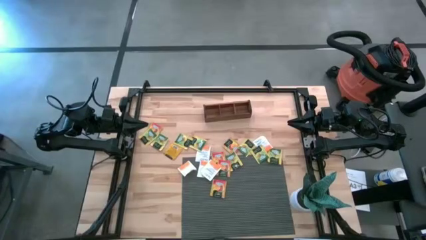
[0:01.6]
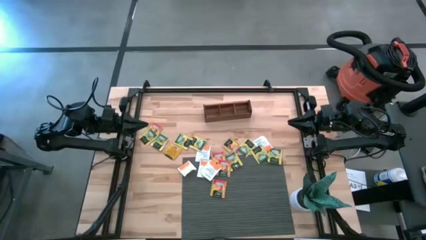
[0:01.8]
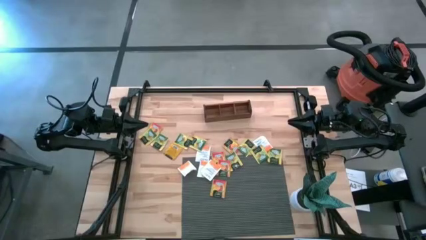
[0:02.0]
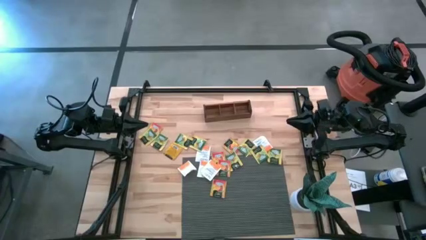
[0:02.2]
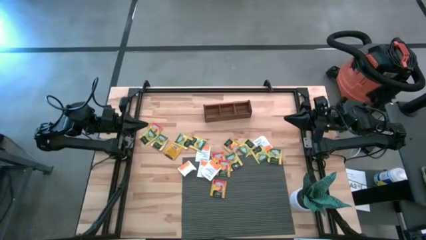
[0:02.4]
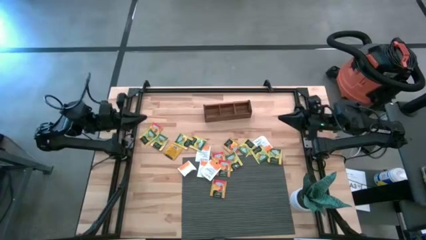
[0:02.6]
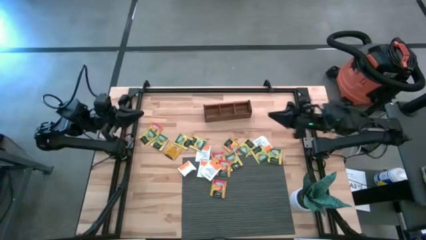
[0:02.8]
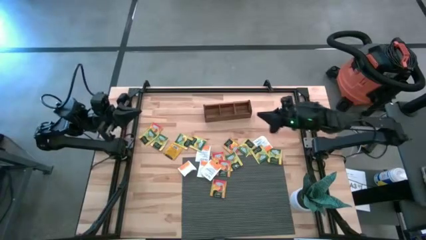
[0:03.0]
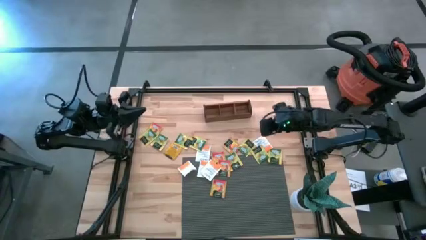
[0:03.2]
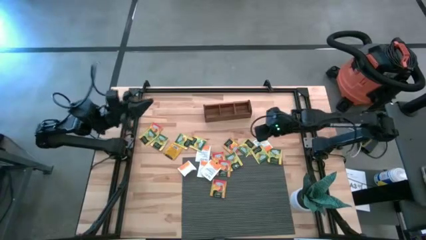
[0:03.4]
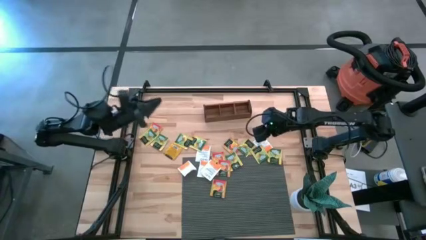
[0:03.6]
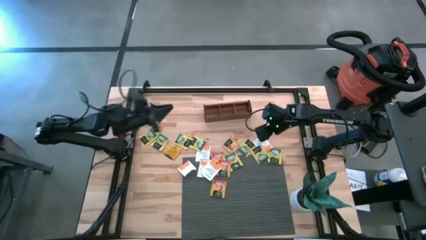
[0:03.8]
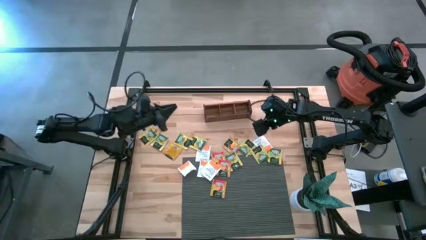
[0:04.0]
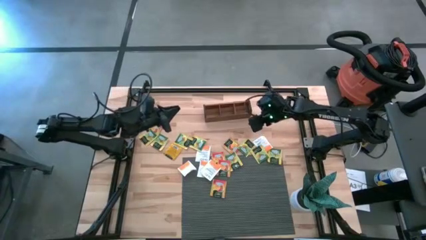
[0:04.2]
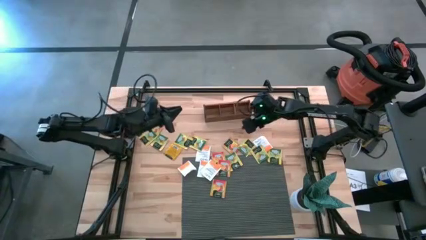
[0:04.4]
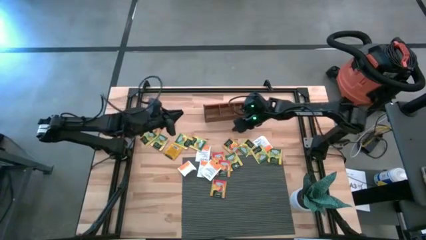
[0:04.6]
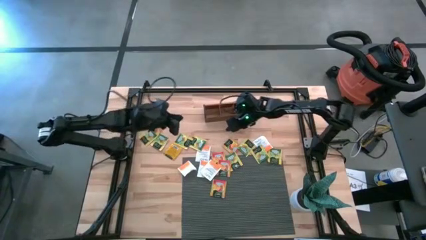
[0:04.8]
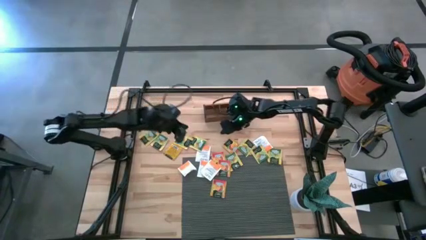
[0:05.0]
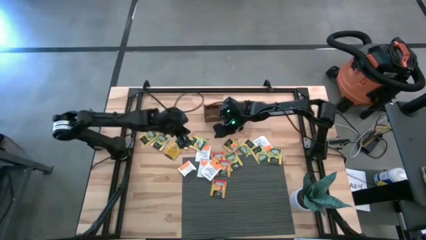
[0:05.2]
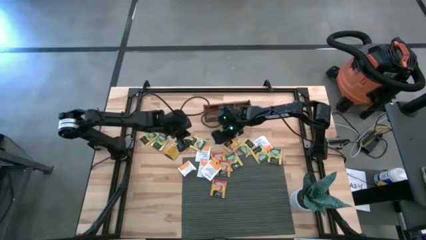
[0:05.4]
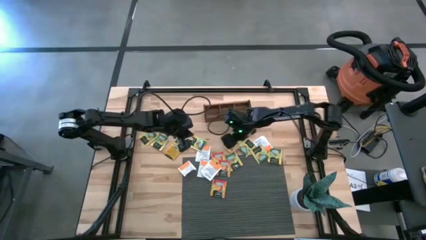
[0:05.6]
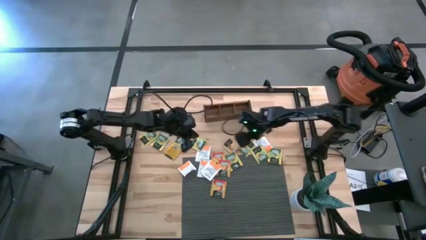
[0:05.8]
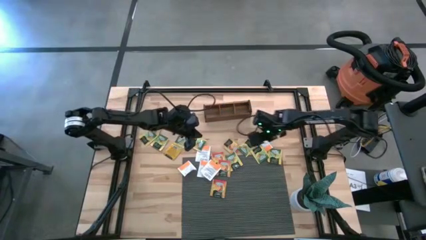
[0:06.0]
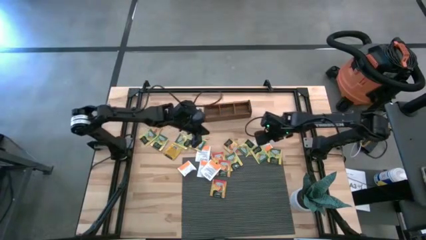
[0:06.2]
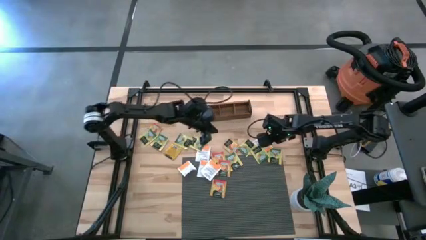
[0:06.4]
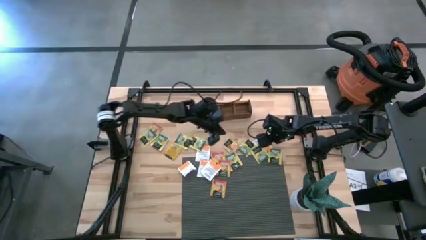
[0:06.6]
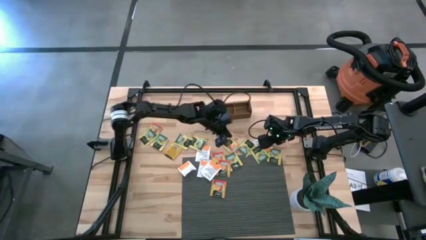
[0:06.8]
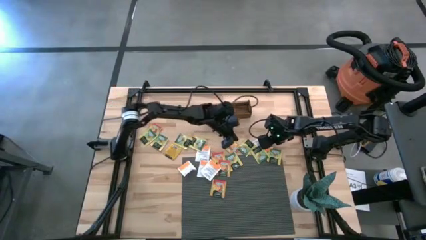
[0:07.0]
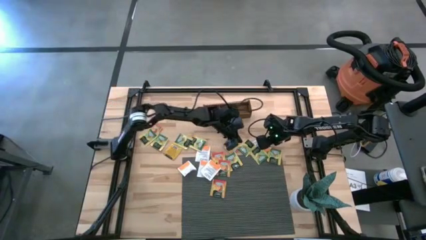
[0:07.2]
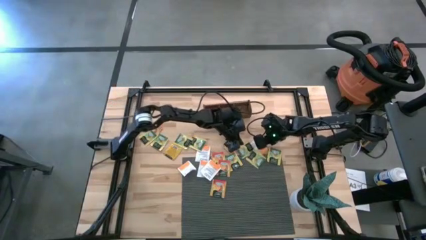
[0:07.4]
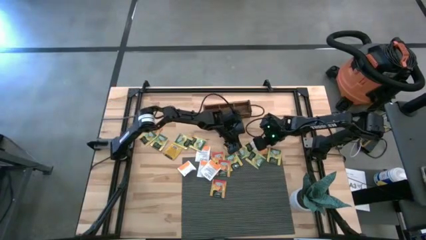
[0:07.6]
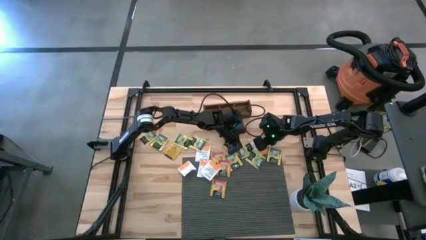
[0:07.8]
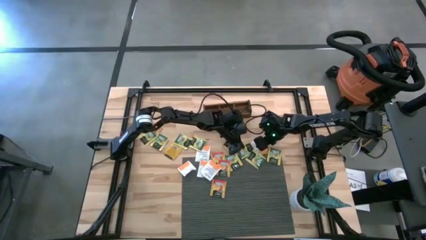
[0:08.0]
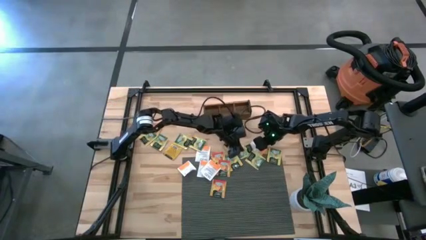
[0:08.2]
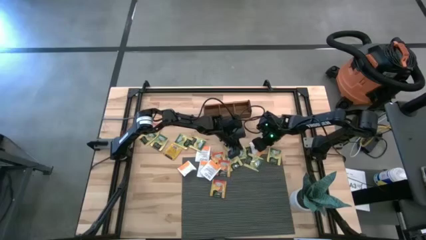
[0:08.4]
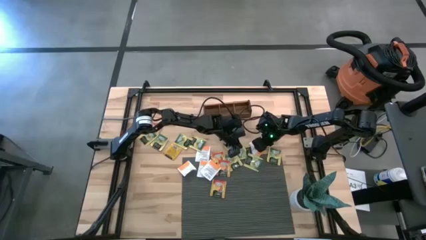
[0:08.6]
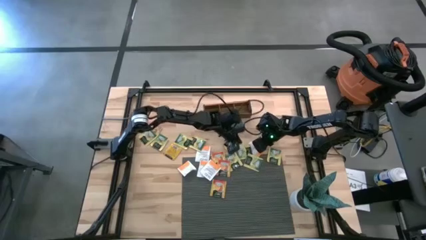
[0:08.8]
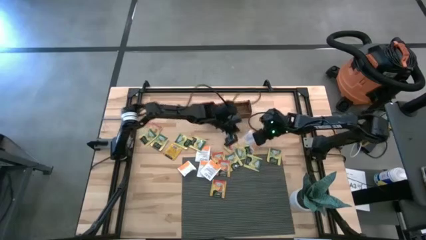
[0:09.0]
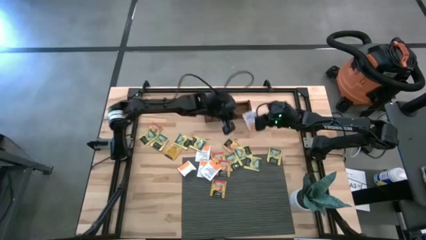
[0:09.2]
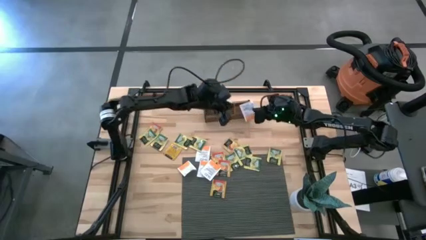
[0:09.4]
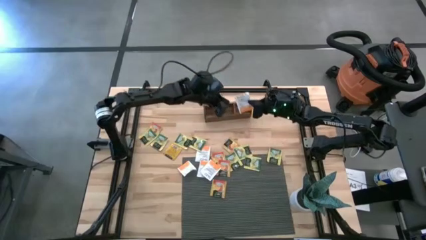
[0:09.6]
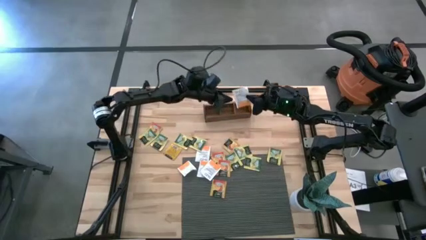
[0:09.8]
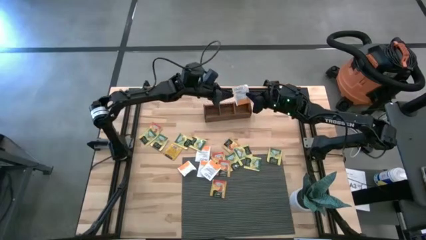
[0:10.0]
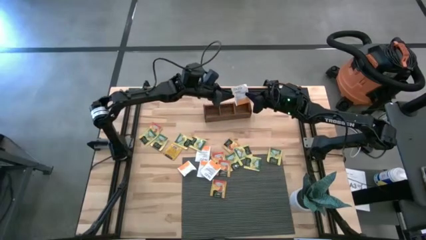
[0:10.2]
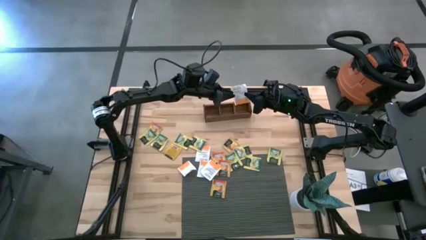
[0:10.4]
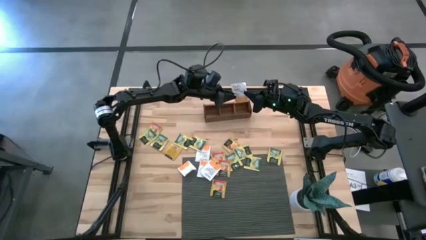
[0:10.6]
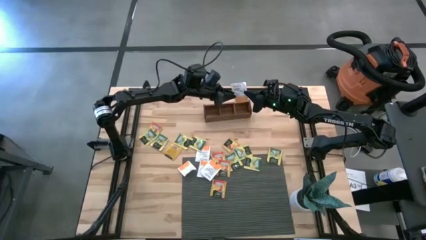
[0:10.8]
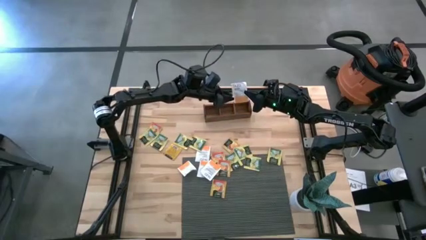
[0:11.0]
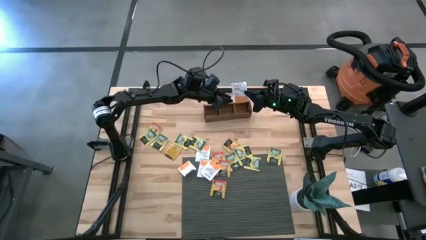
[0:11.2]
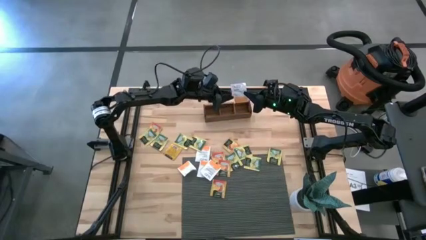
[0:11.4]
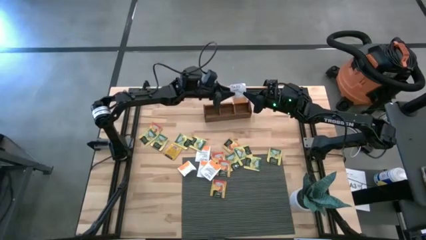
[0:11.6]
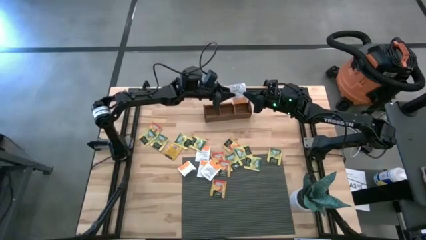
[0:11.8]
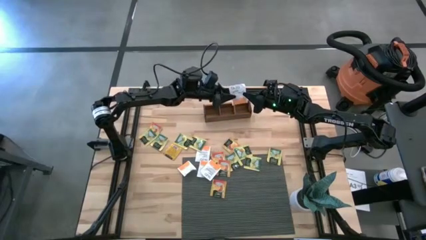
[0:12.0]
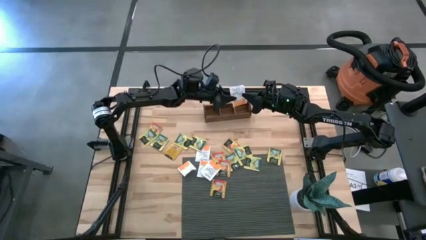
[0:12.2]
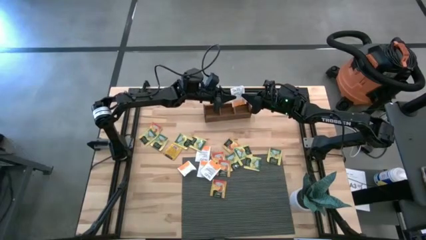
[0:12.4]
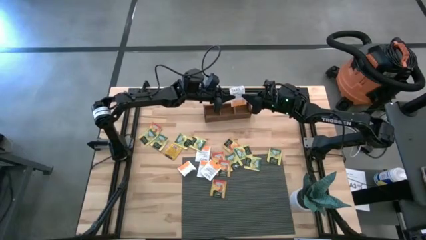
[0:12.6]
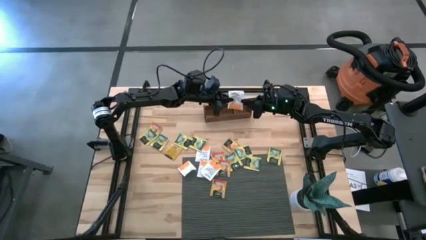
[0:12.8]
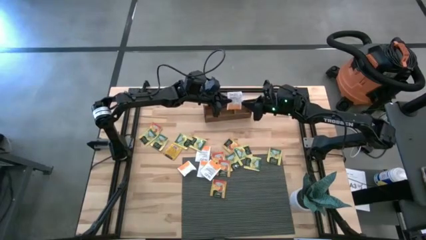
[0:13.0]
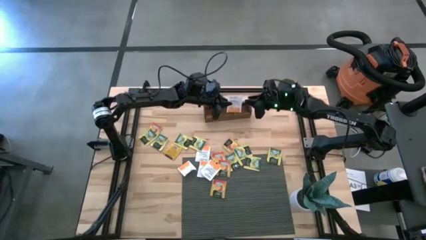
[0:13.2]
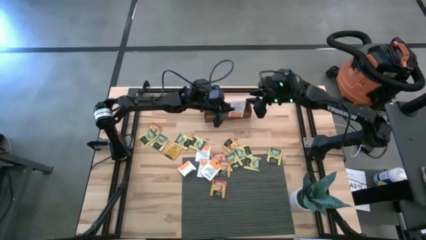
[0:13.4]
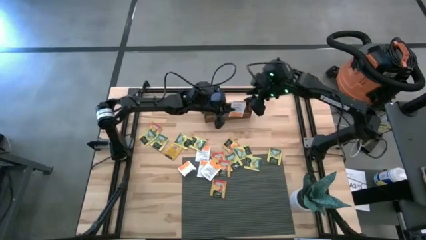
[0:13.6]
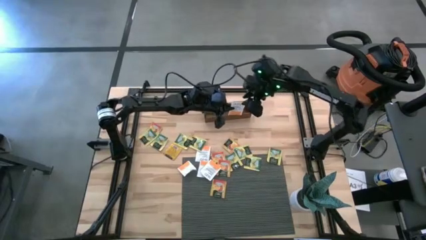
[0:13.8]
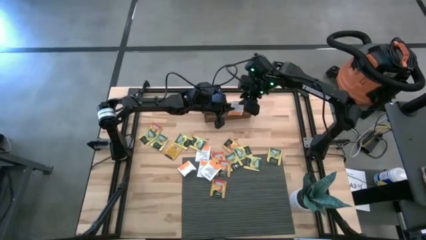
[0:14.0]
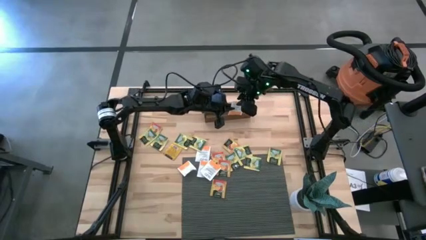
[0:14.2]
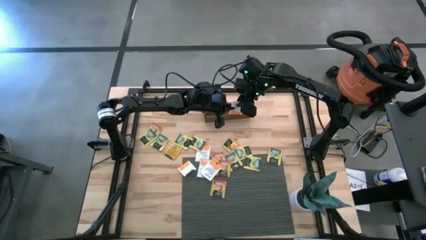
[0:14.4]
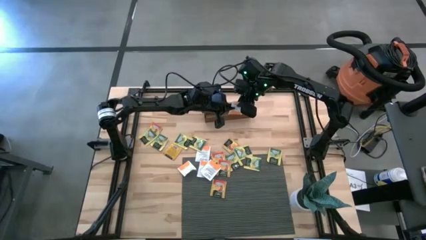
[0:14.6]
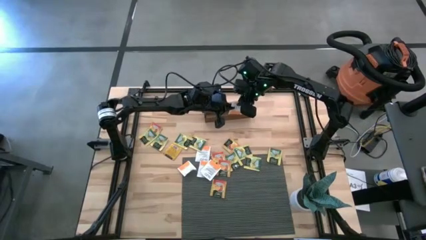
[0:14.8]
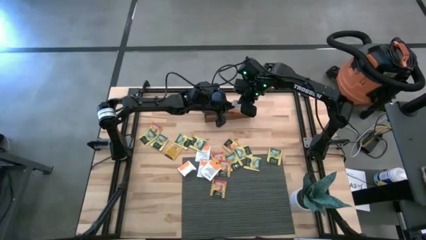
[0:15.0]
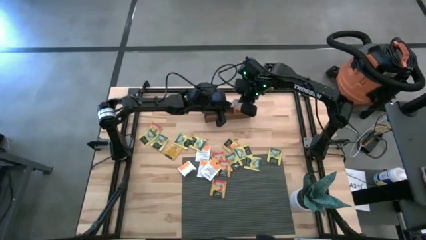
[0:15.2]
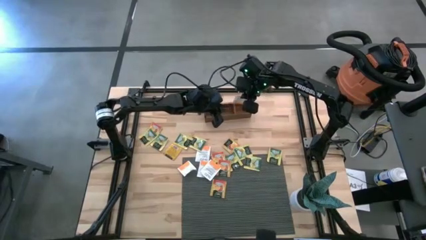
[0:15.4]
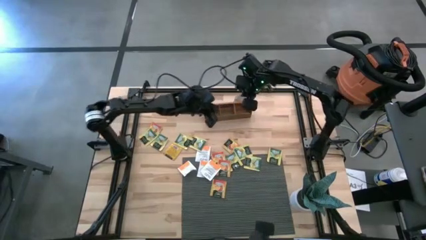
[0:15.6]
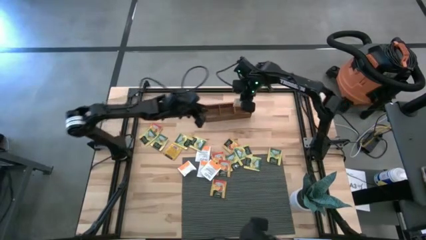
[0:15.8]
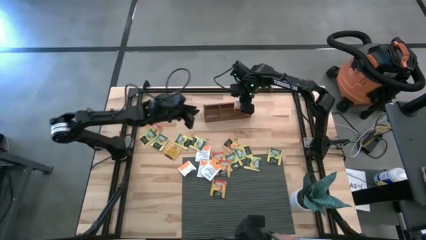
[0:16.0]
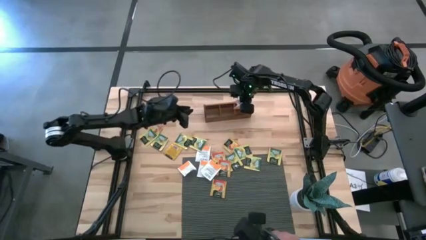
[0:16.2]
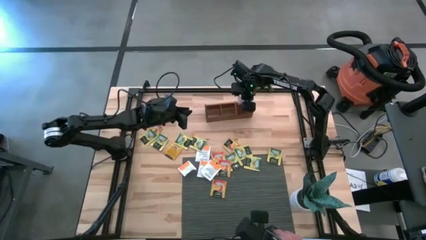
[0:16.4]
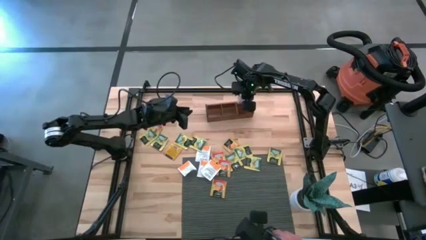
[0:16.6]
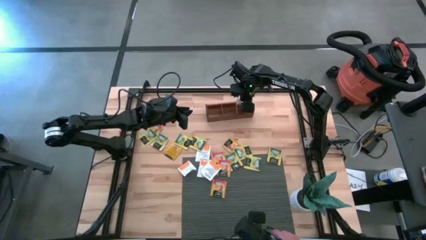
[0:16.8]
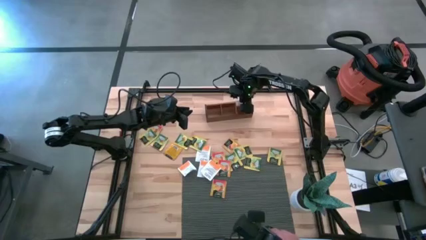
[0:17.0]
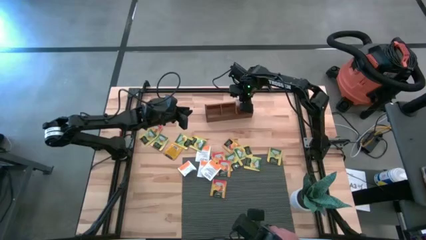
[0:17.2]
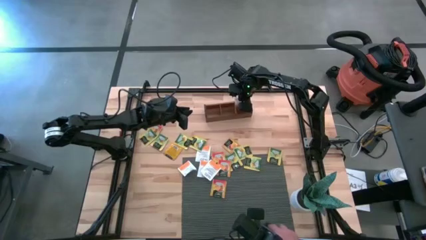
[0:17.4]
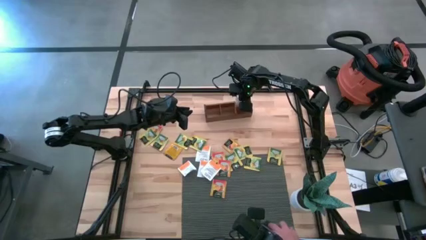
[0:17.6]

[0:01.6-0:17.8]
Task: Pick & Place Tea
Put the white tea bag into the right section of the wooden organizer
